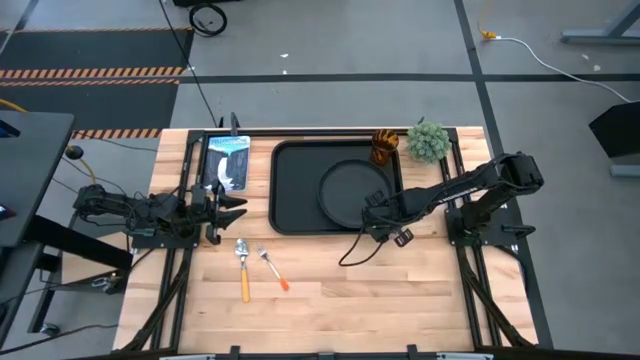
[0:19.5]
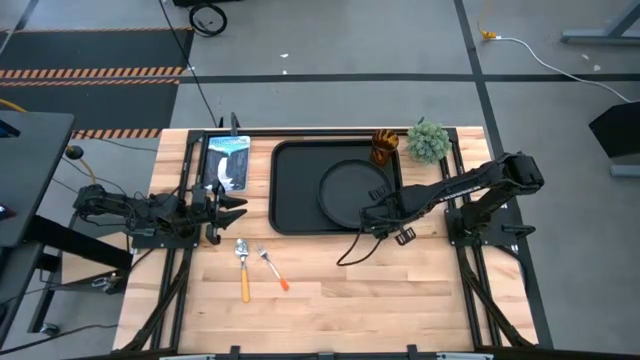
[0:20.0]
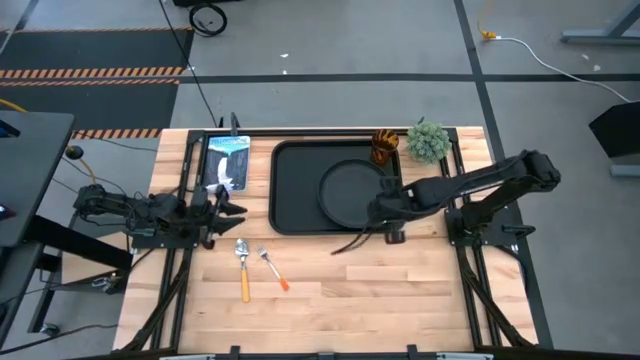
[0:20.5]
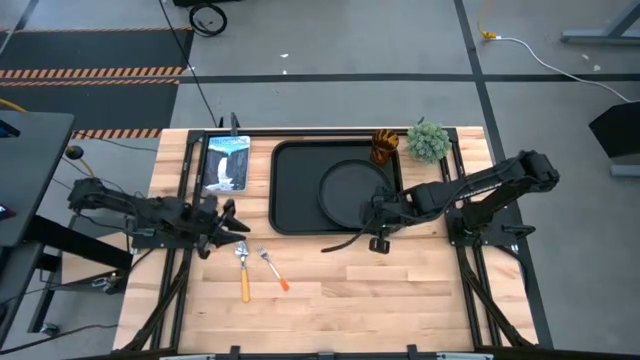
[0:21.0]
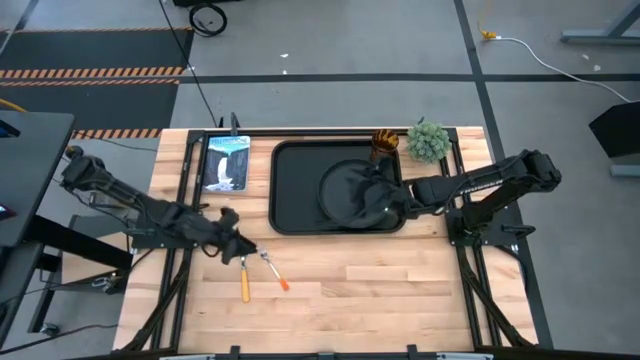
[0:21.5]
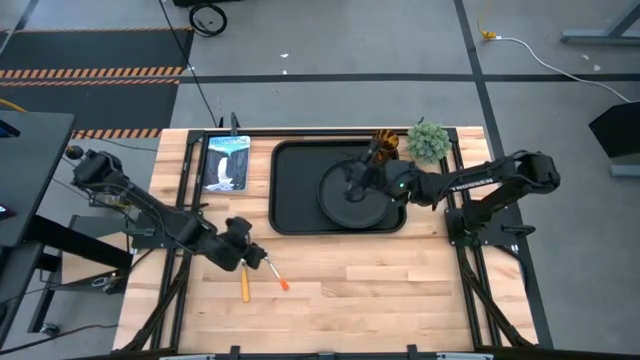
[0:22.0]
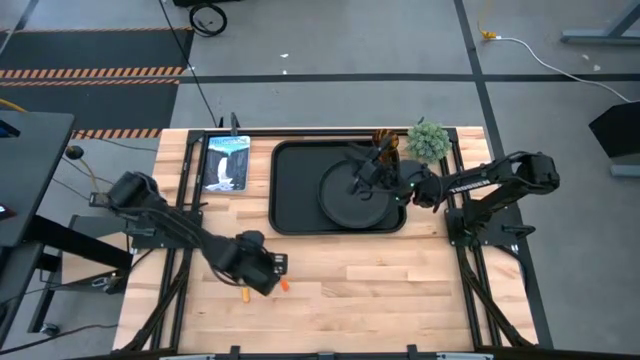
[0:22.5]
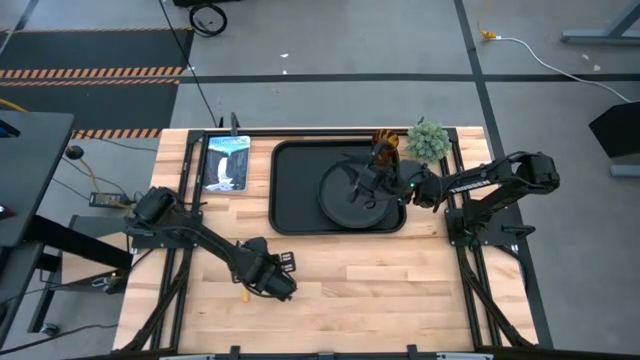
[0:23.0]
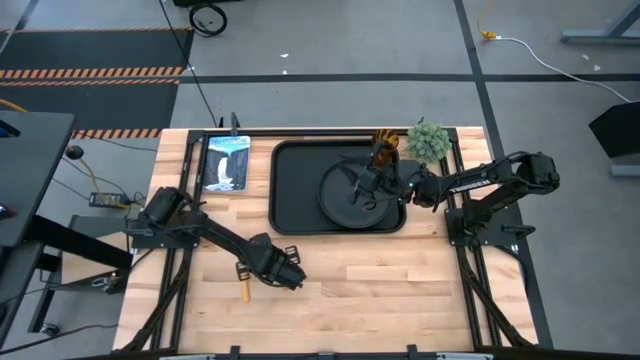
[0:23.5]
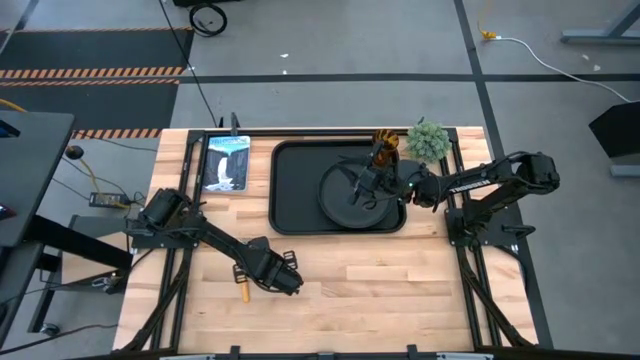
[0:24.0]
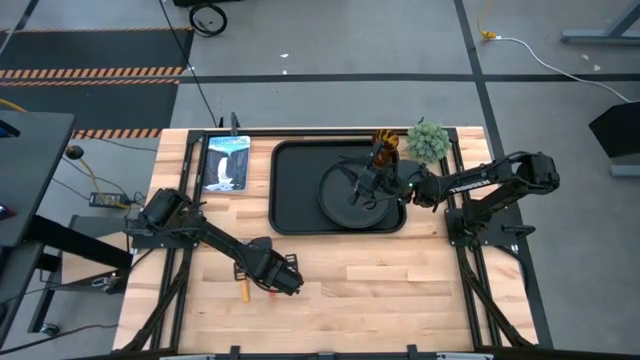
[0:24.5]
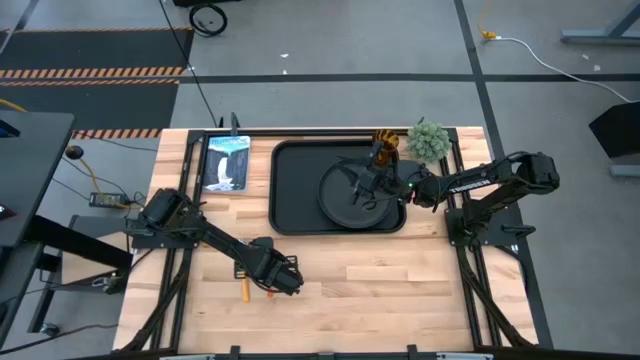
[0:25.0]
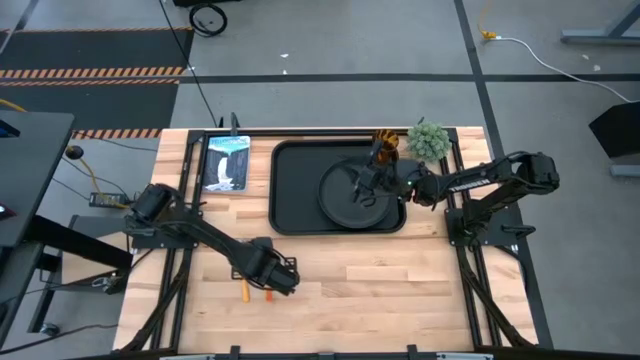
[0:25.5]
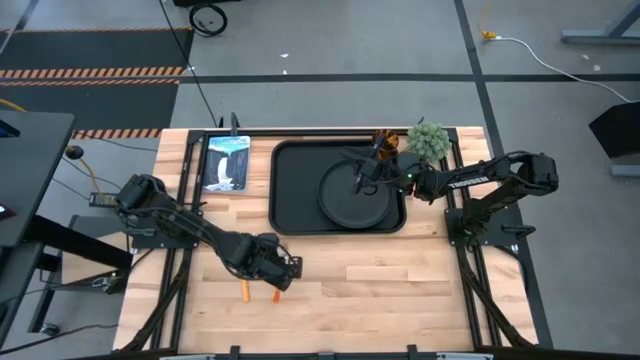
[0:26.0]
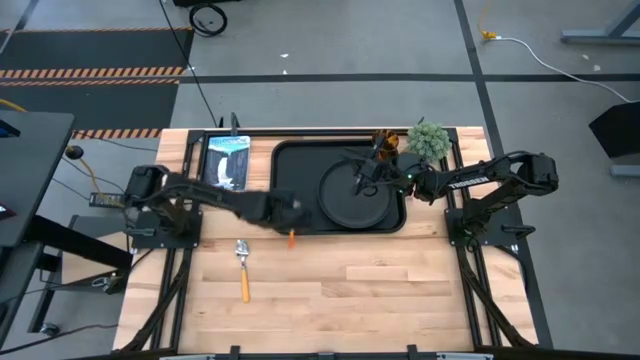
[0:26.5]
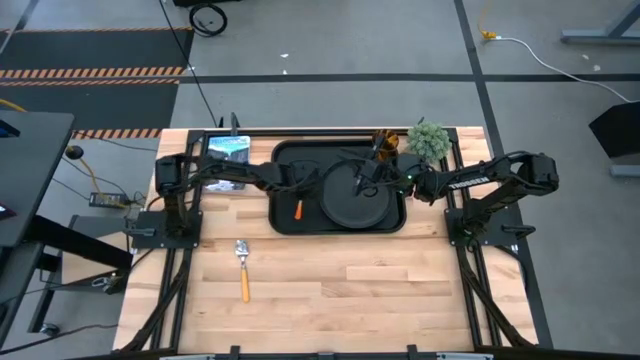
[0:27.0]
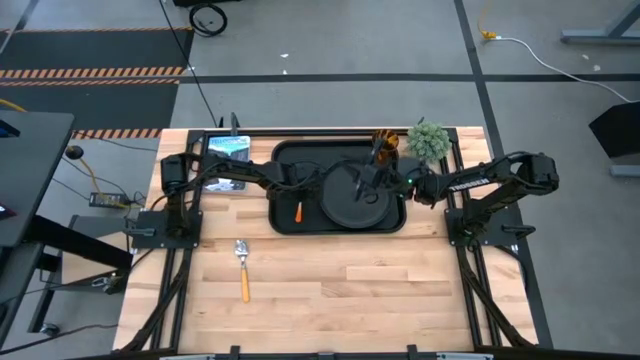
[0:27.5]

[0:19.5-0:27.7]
Task: Pick and place plate/cup/fork/spoon on tray
Put the orange fork to the left of the black plate on the black tray

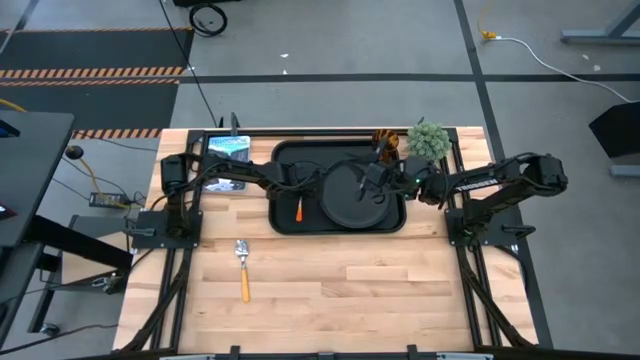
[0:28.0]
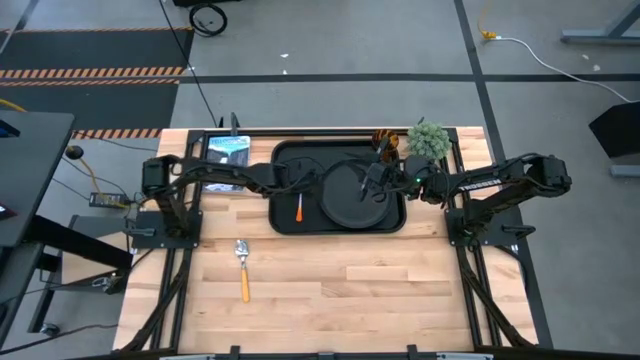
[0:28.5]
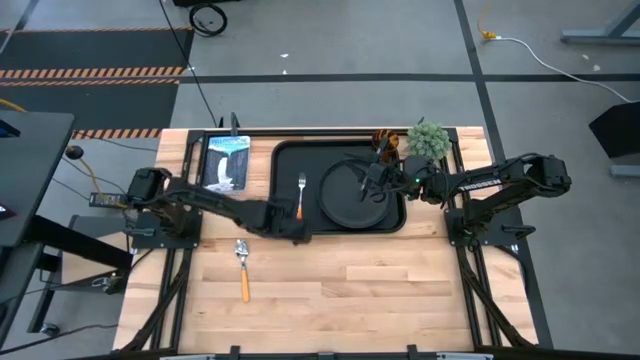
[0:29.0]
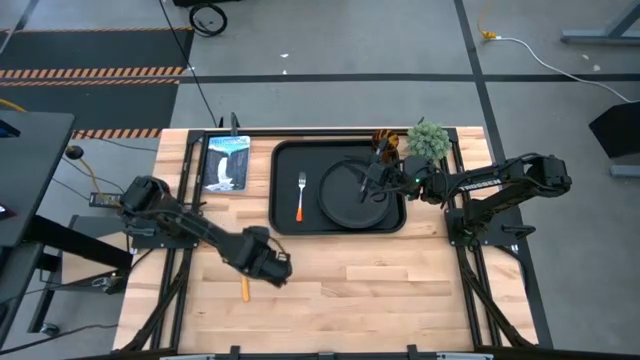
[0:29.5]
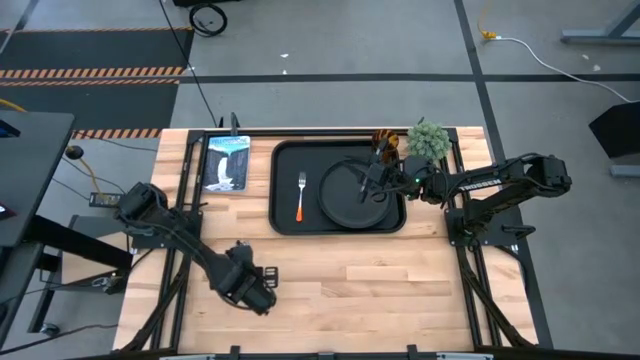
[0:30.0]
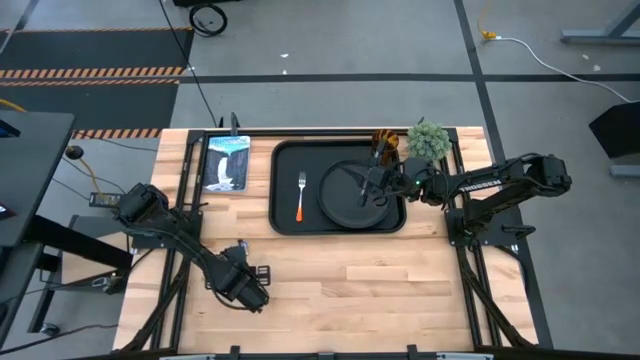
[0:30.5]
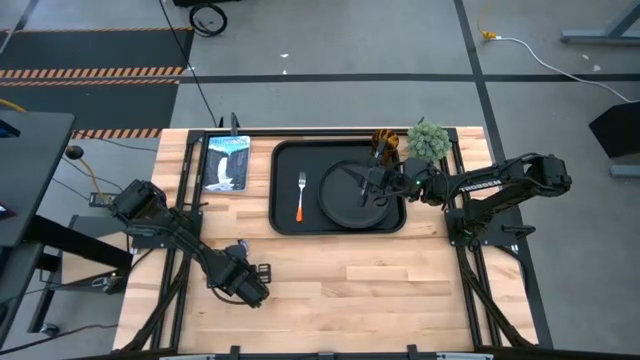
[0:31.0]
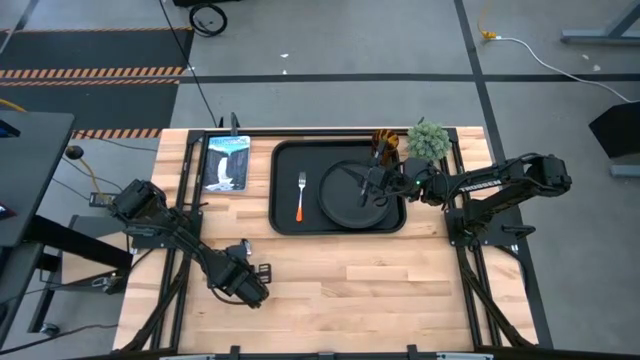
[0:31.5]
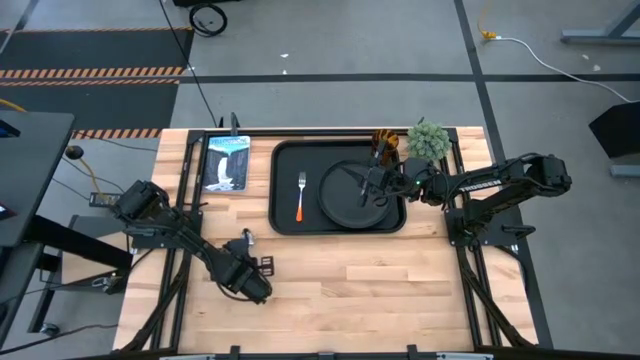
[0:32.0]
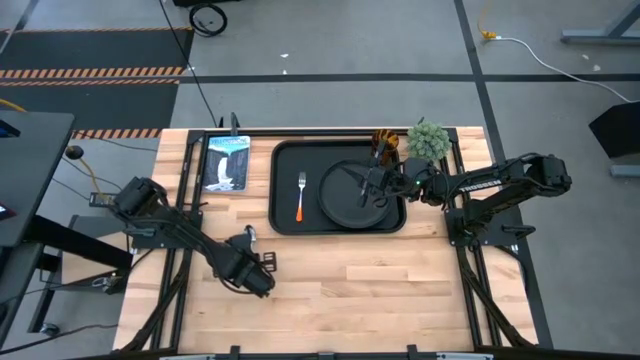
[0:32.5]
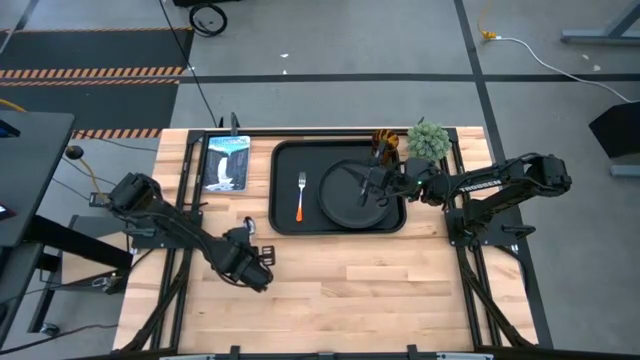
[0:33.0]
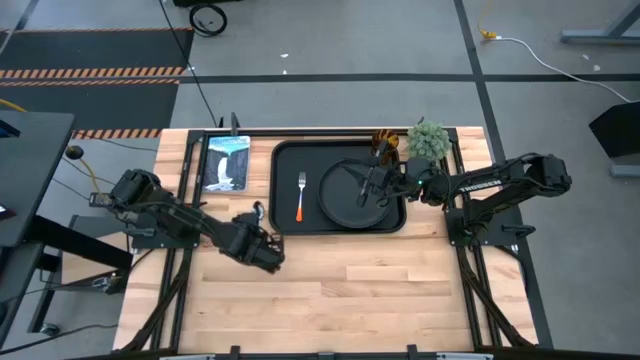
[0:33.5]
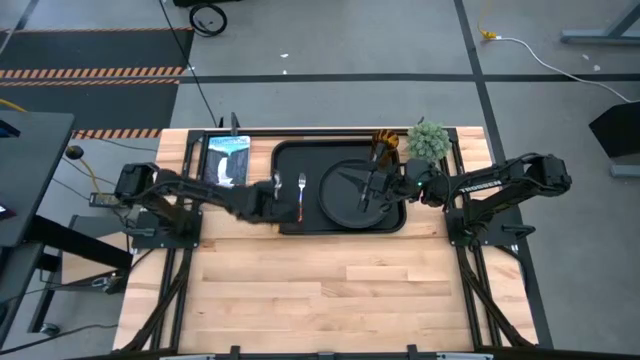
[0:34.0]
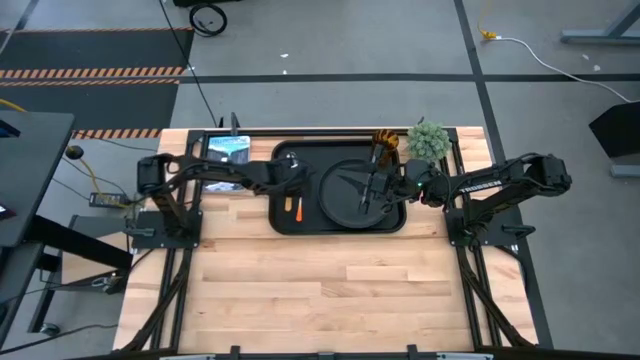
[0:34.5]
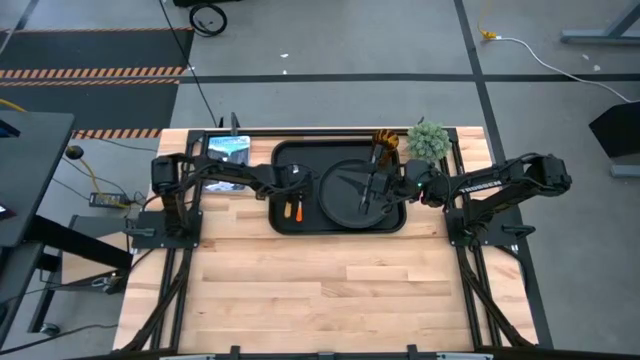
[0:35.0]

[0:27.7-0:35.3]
Put the yellow spoon to the left of the orange fork on the black tray

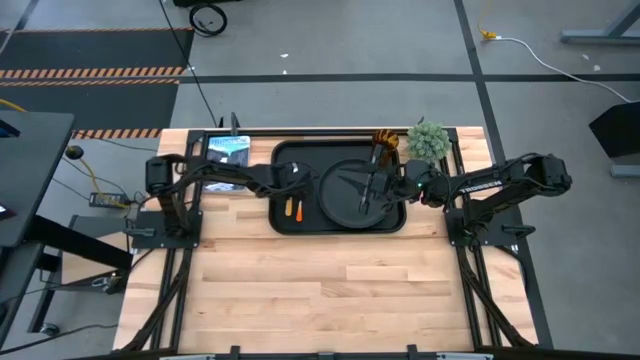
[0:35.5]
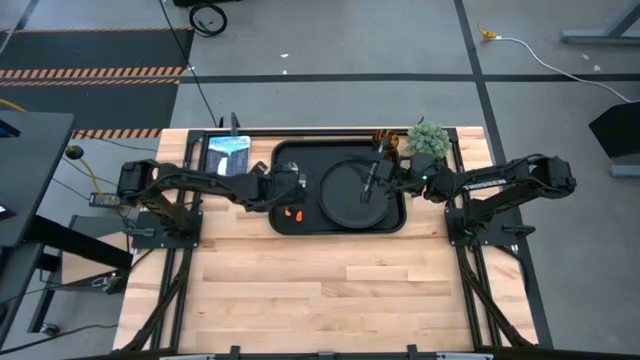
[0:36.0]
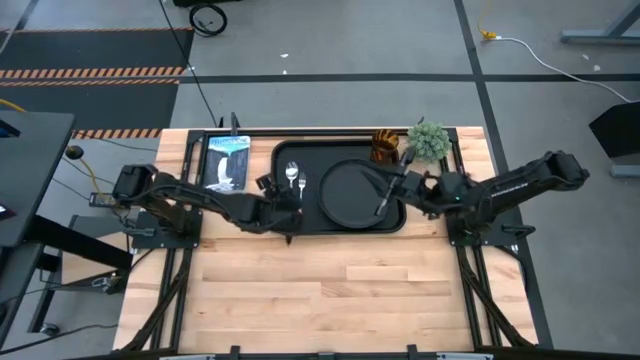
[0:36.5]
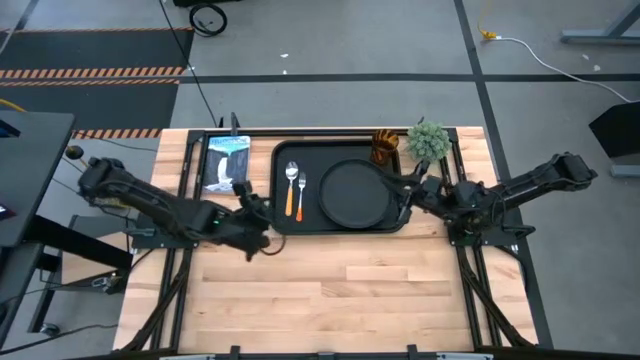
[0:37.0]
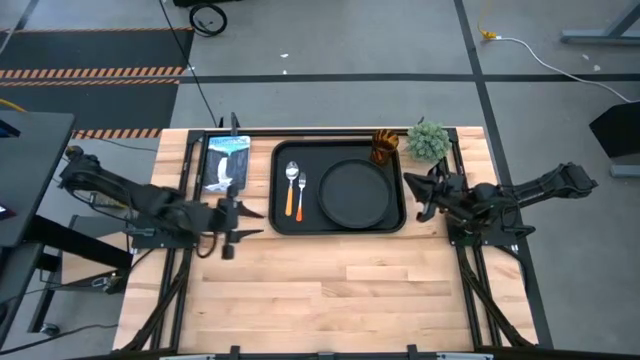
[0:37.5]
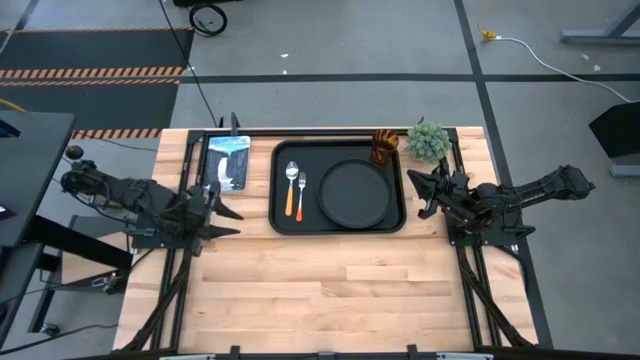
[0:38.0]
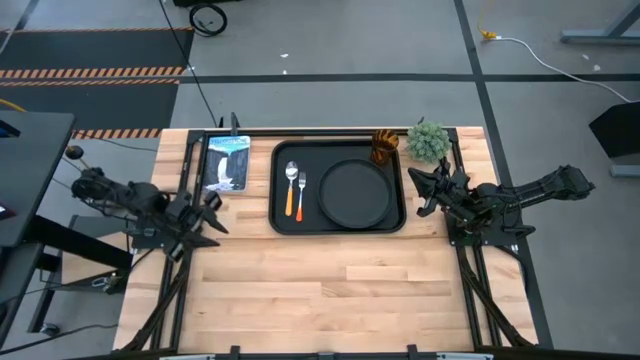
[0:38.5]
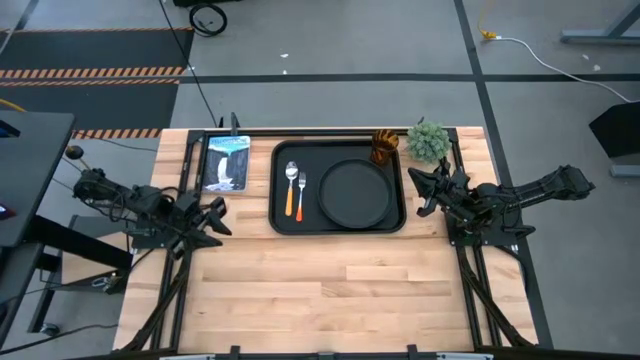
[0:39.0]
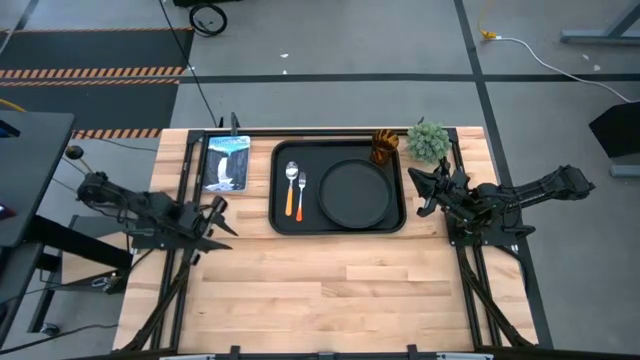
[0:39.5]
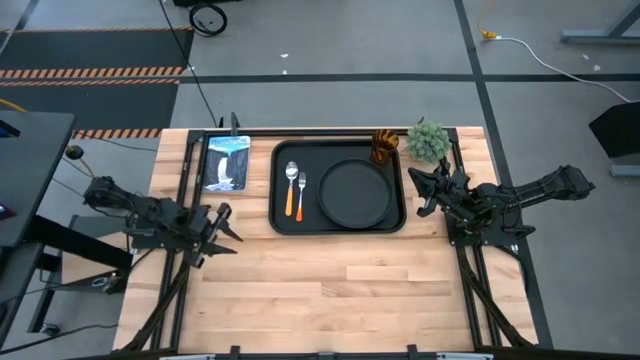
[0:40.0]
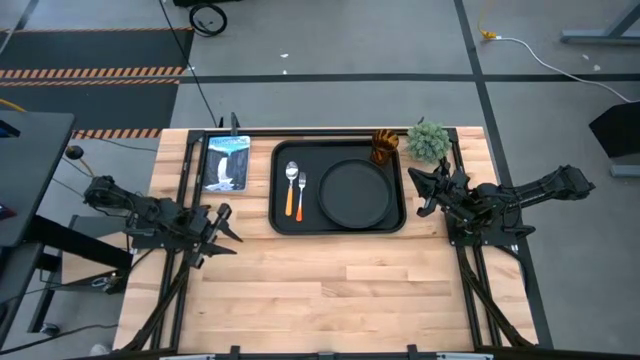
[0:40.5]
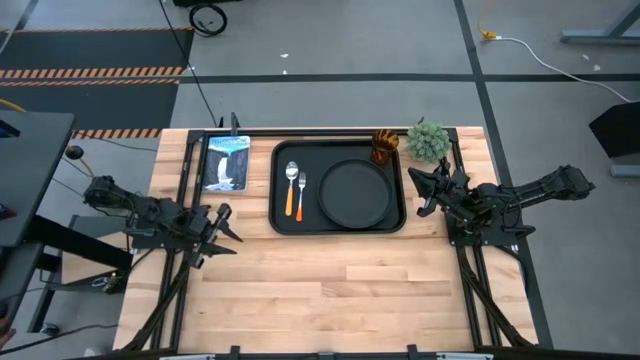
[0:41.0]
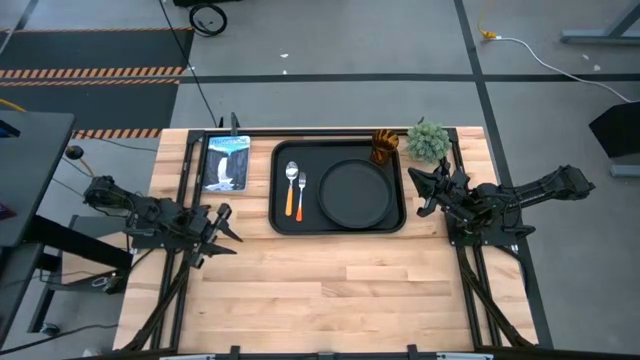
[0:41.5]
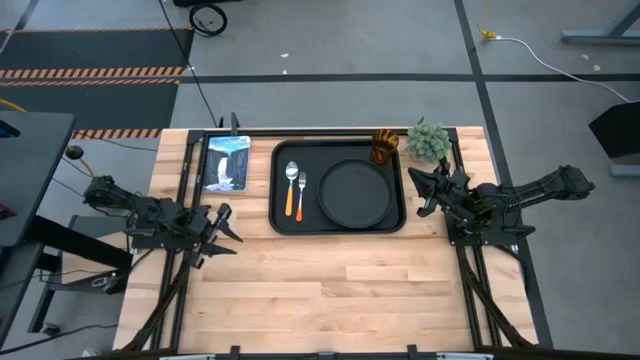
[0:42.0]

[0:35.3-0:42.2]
Return to Home Position
